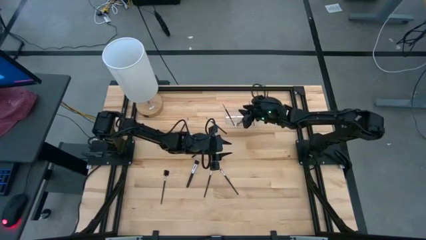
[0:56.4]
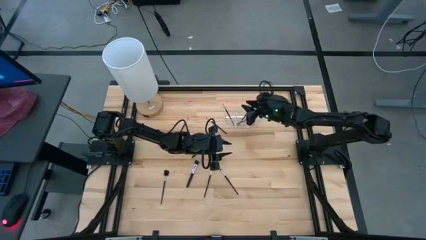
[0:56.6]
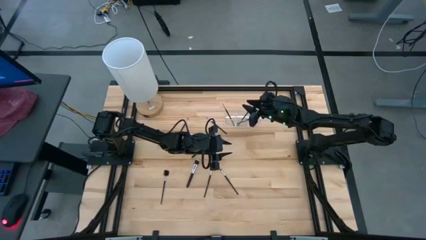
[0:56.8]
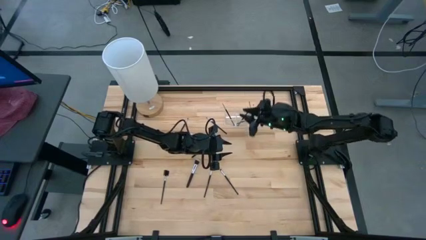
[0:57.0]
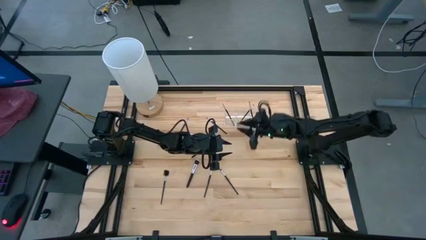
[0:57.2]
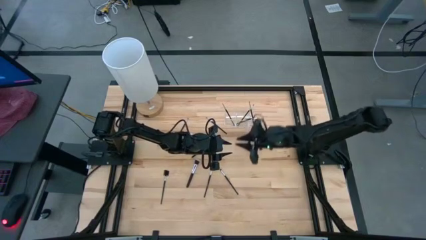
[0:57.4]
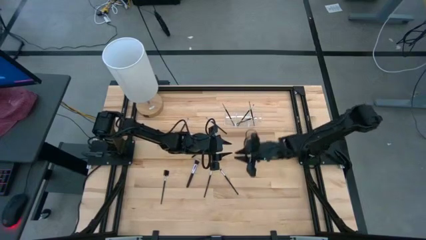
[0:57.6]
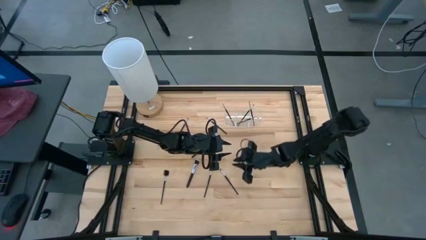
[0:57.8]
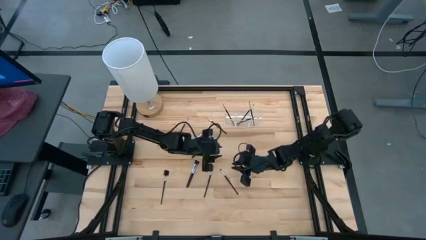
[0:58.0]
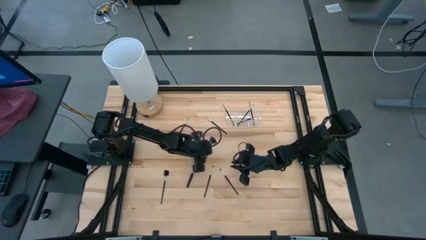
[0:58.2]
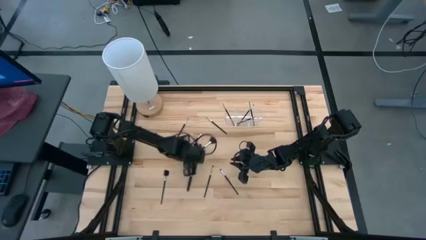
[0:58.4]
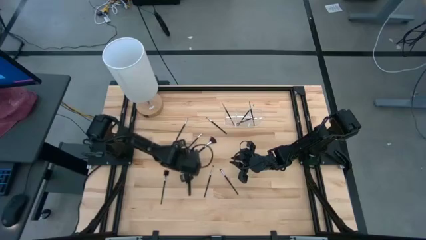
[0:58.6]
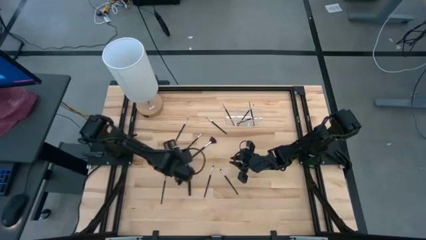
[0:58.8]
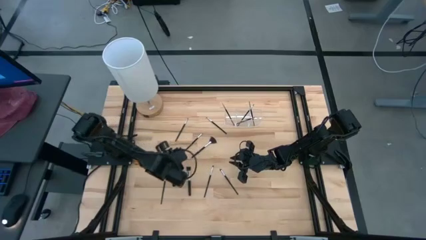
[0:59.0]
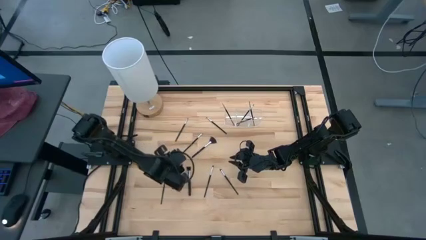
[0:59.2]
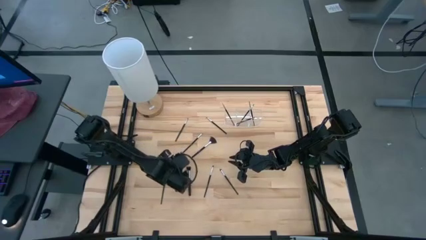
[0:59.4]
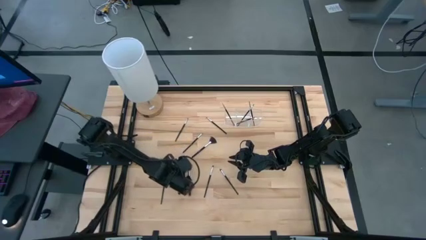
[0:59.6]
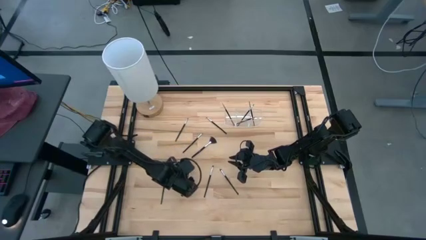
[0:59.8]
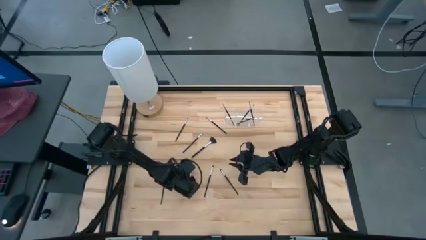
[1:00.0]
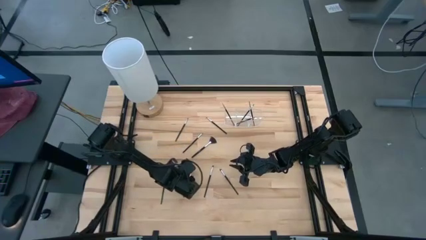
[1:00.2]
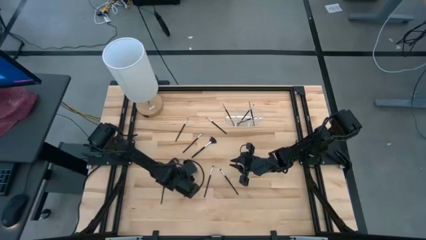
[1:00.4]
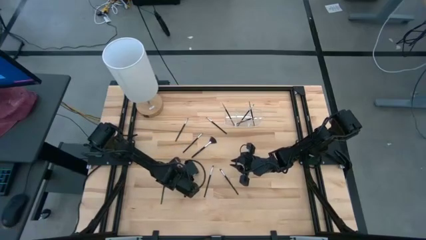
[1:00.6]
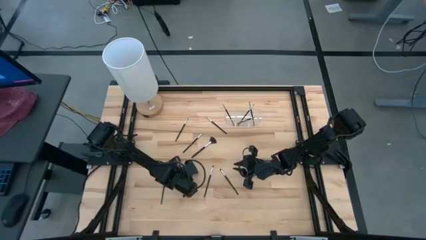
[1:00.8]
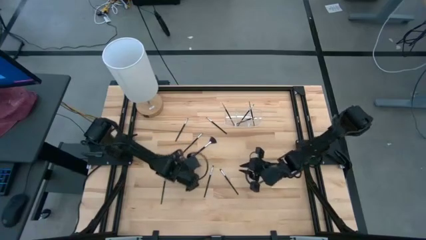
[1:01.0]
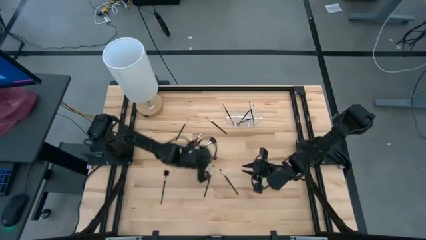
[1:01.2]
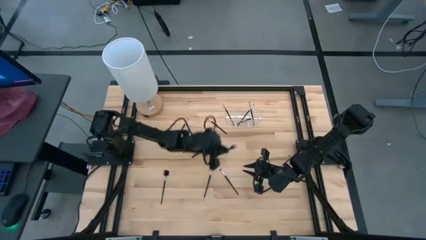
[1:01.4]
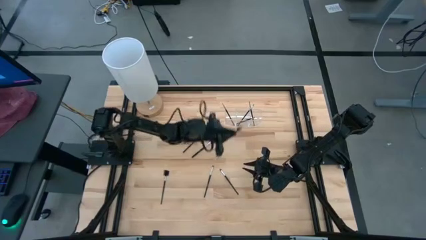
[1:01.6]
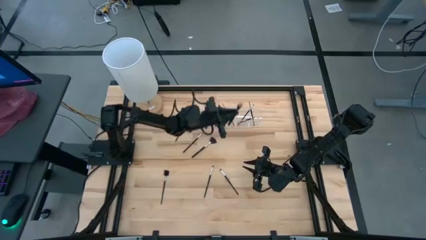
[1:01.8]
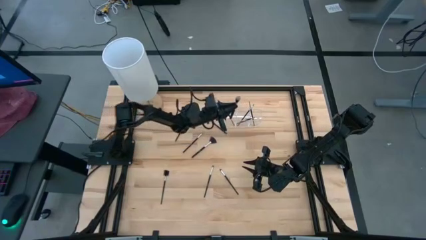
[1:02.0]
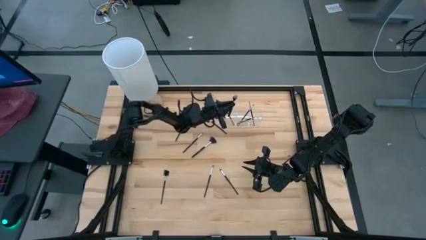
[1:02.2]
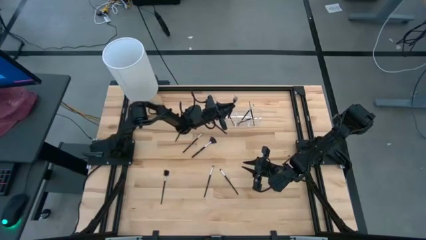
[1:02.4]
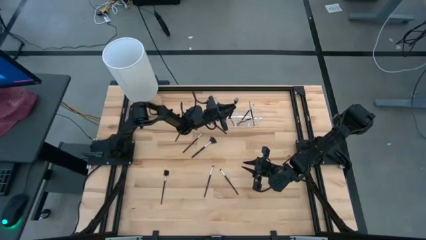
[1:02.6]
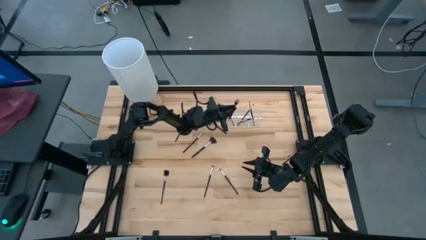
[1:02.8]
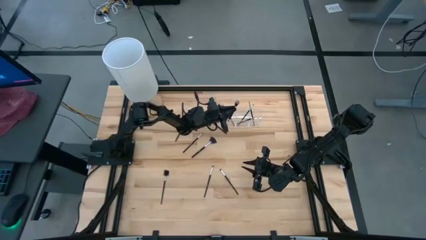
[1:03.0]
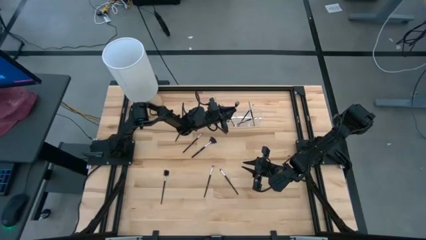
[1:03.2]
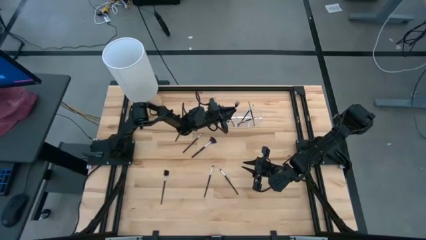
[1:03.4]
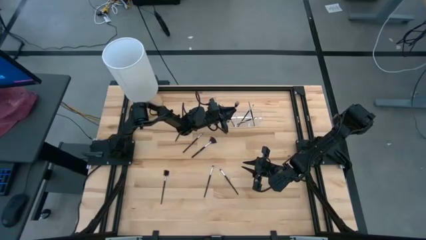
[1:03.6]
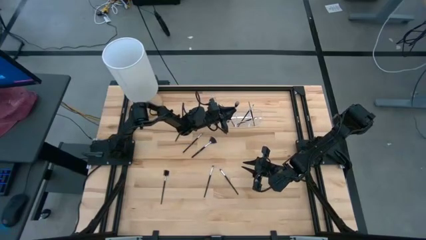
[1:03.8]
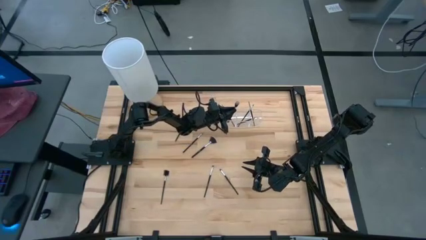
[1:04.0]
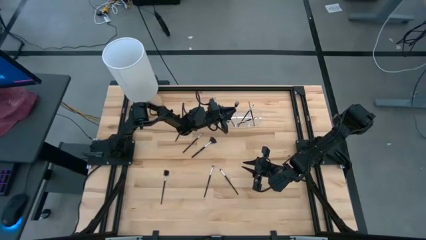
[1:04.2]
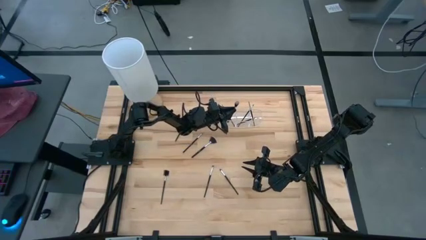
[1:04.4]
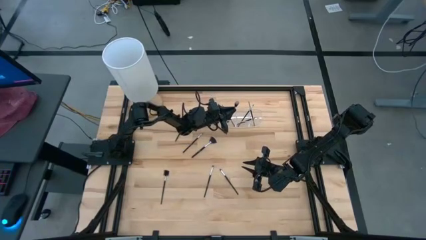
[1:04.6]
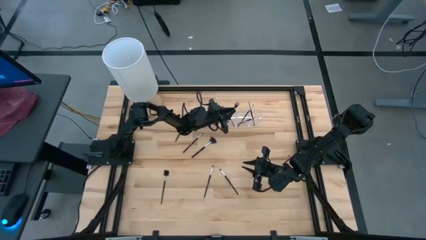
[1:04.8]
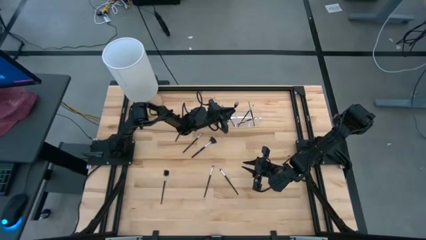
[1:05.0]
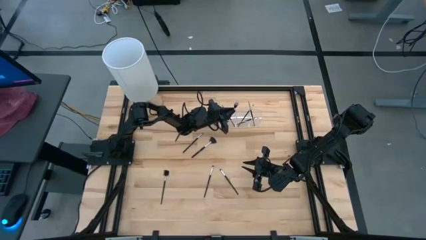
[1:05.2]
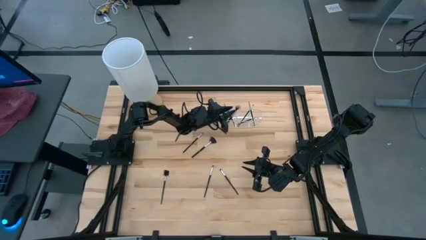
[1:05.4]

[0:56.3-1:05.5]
Task: Put items in baskets/containers
Put the black powder brush into the transparent organizer

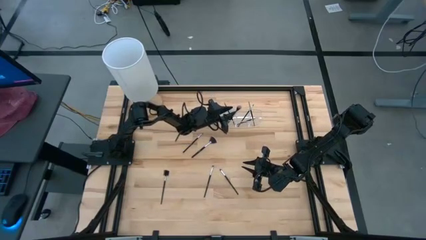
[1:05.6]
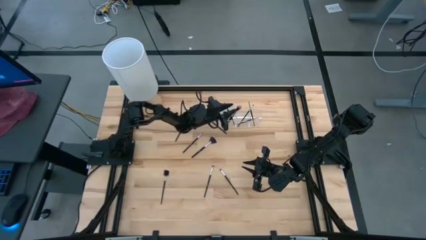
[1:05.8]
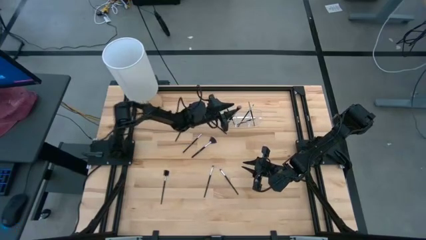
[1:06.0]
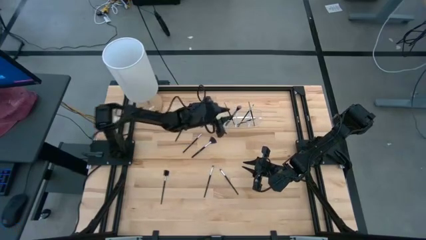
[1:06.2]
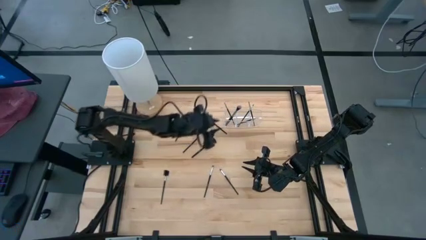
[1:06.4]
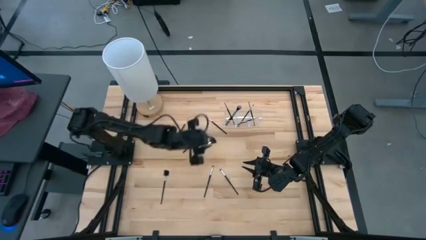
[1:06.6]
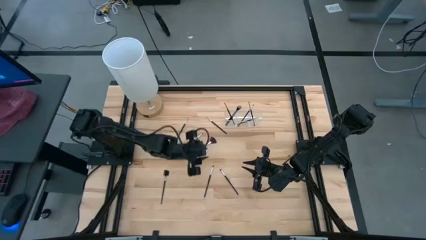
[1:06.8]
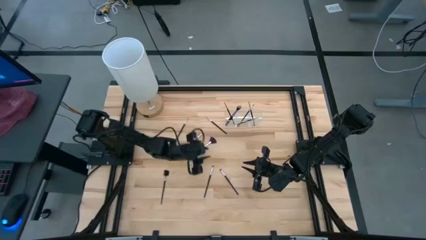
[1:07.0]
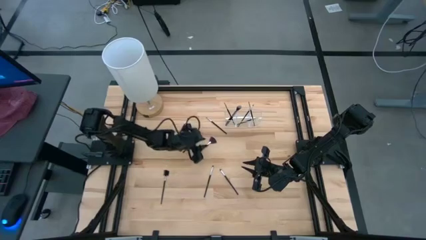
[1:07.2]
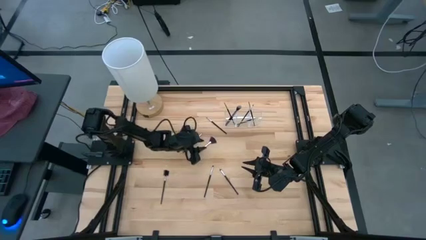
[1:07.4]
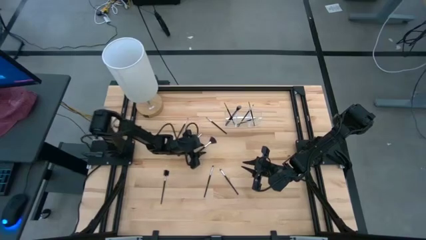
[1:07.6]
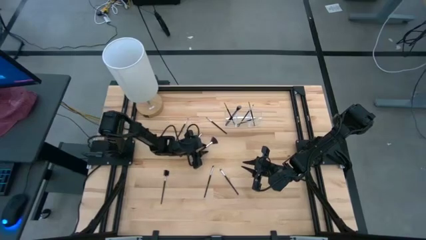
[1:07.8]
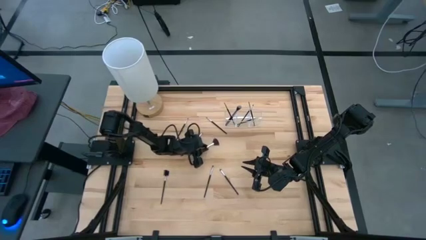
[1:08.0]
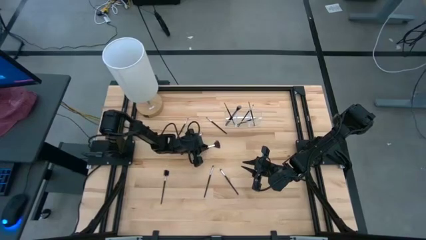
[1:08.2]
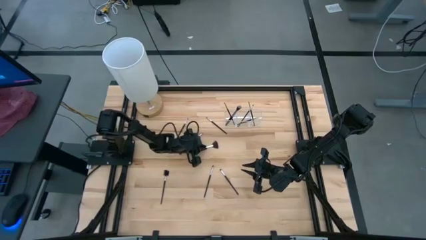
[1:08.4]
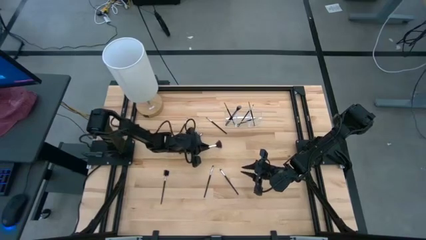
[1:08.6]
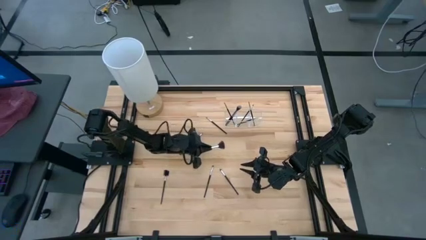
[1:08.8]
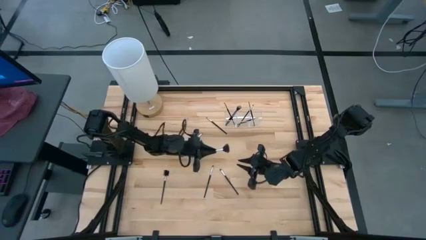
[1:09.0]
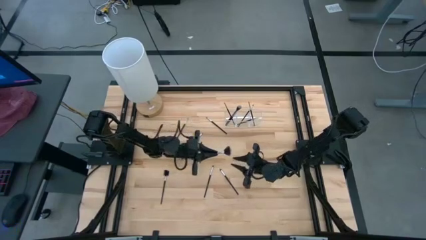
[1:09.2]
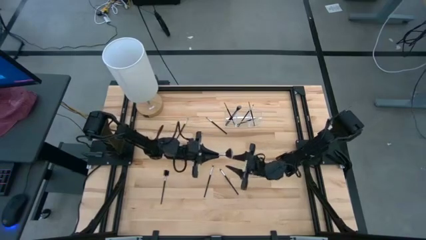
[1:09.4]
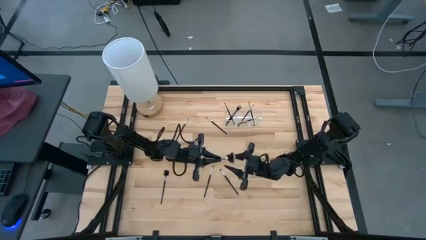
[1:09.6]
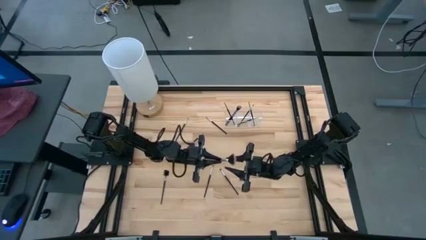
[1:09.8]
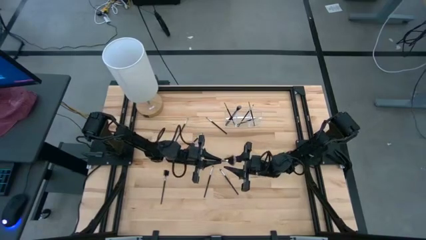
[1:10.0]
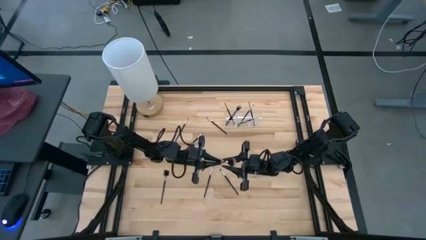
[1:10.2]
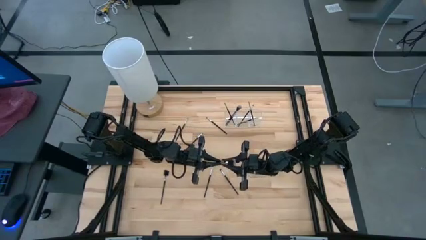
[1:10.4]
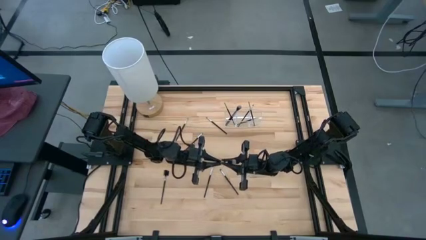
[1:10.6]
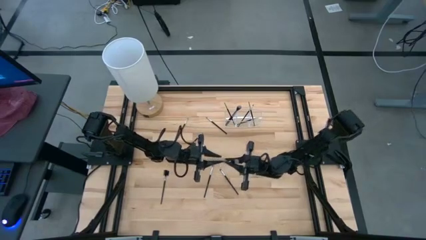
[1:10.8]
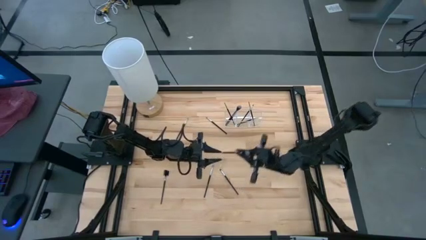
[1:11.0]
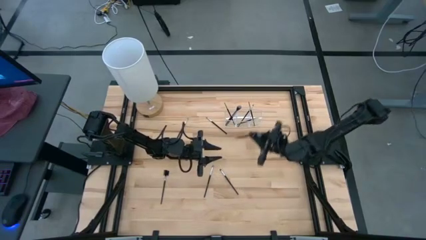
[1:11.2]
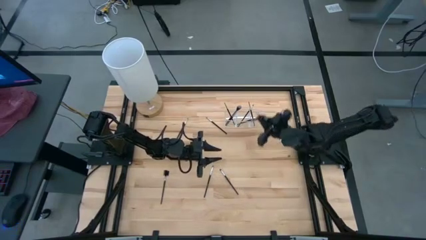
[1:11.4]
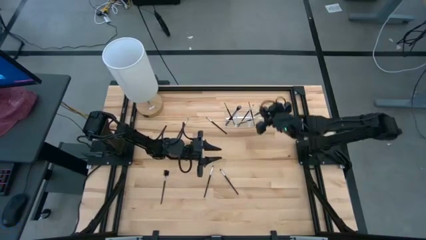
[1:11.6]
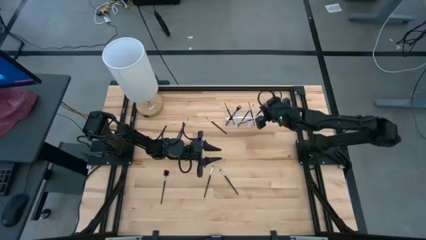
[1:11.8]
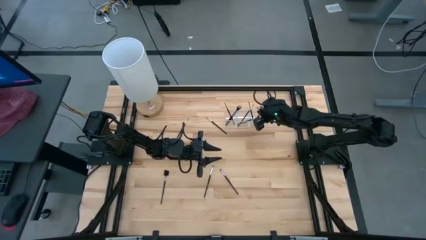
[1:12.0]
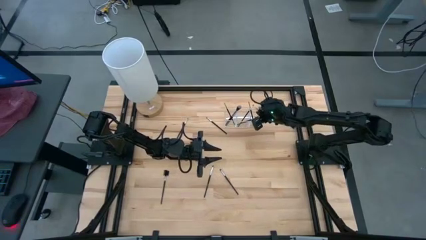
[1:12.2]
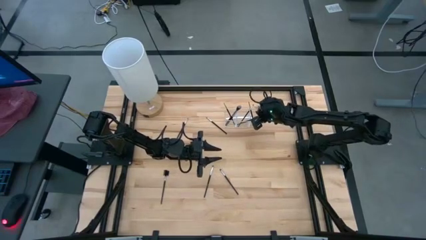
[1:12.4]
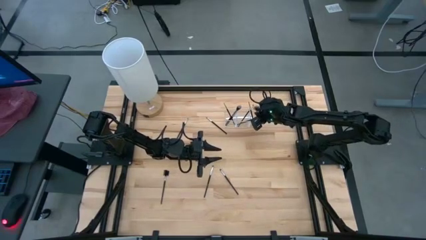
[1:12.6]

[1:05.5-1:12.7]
Put the black highlighter brush into the transparent organizer
